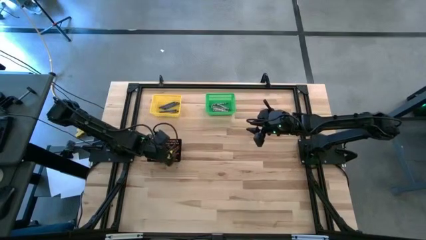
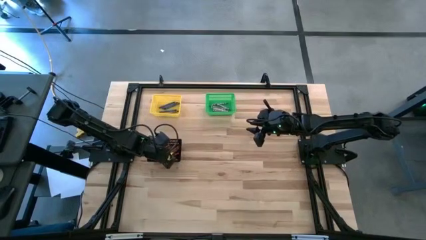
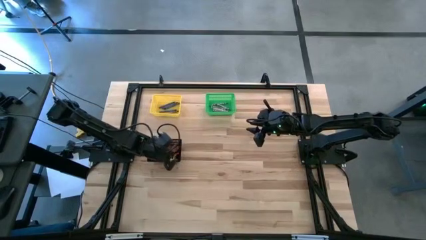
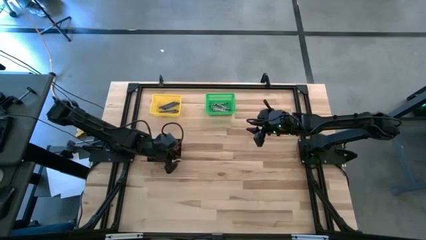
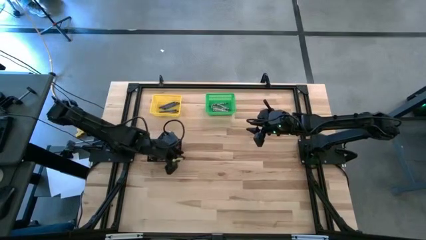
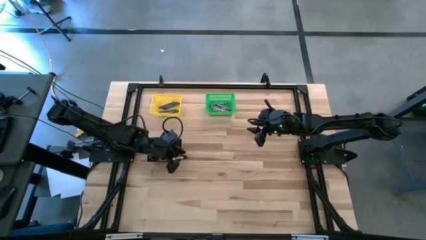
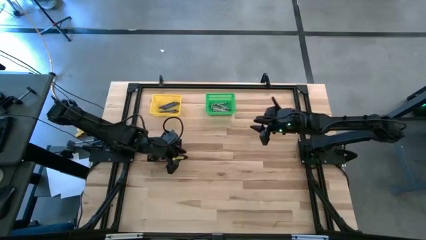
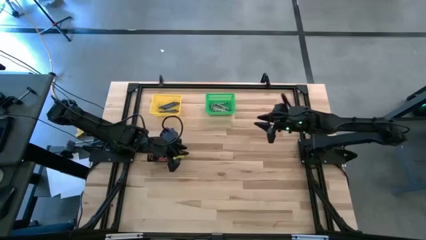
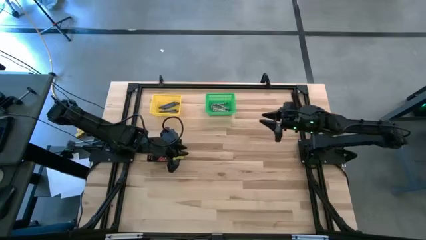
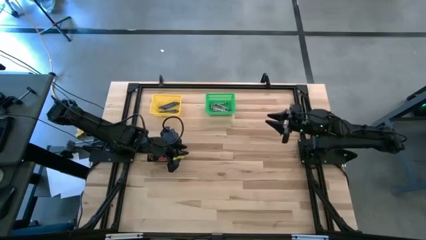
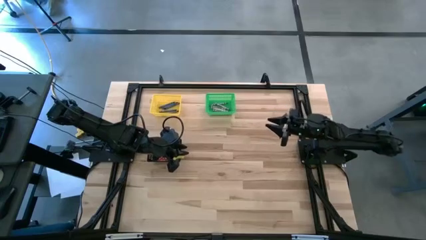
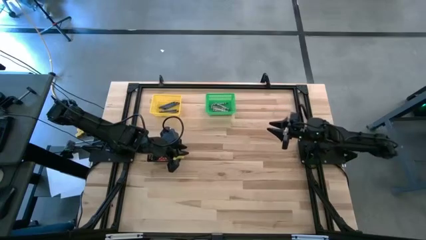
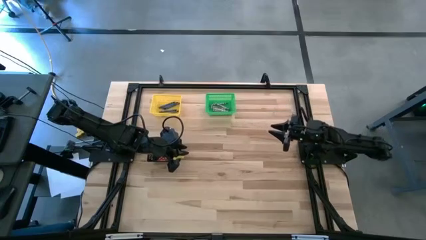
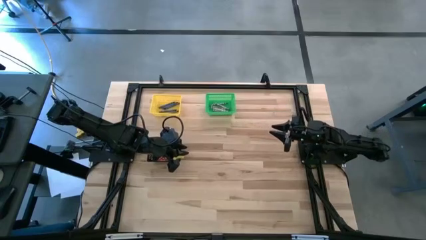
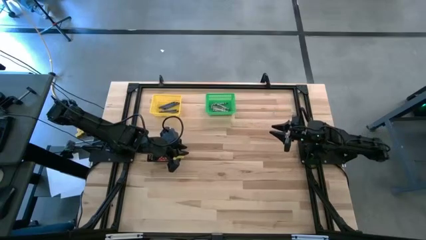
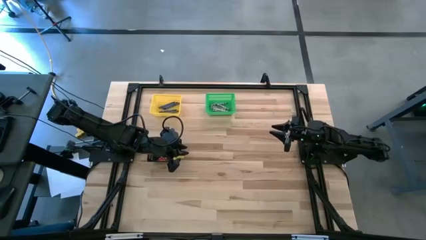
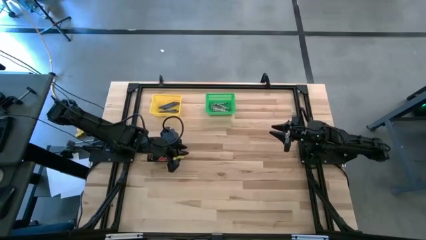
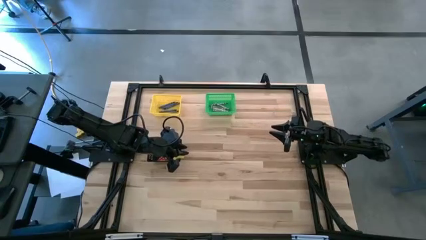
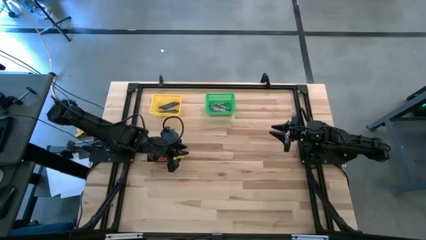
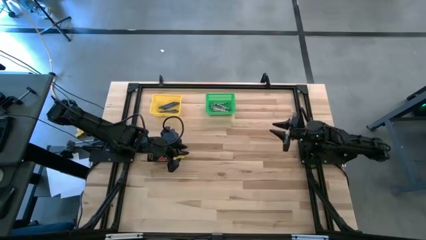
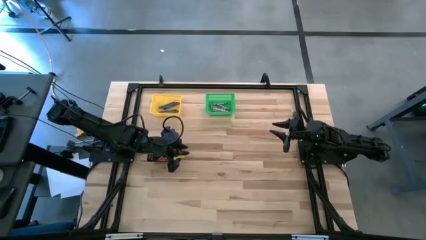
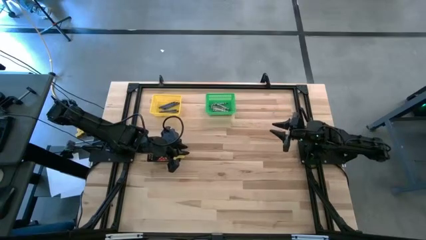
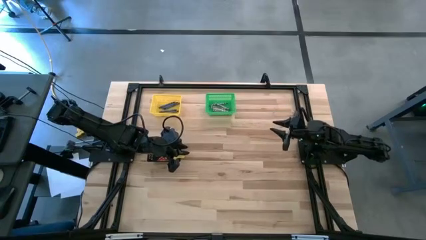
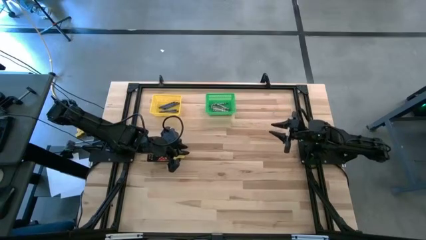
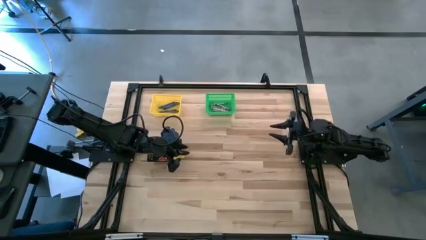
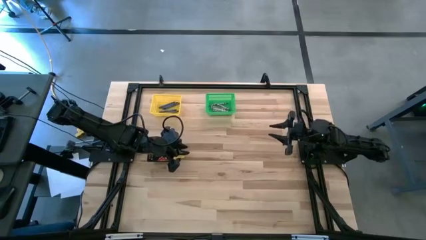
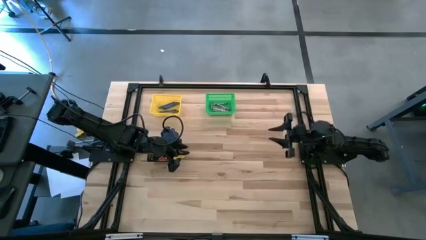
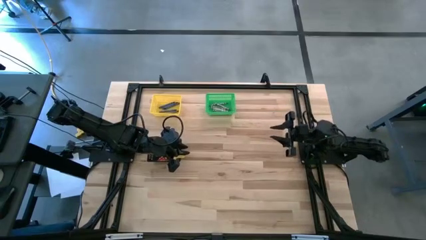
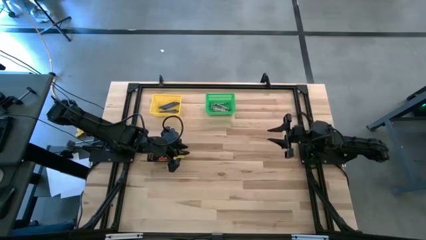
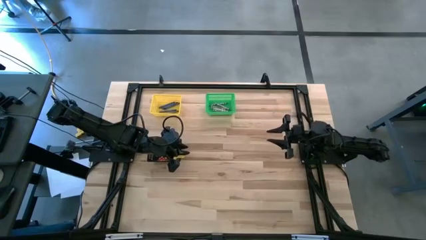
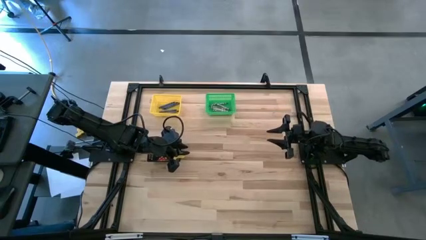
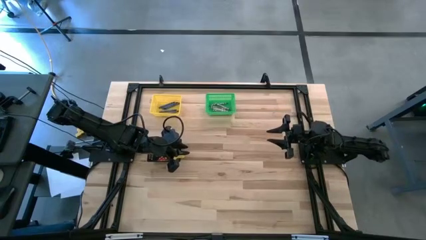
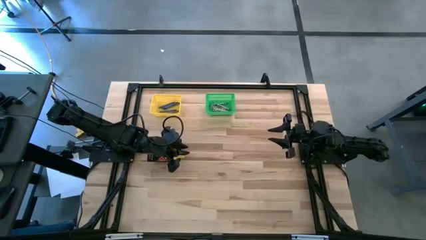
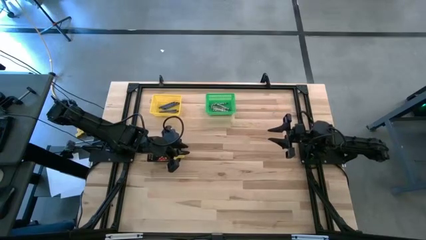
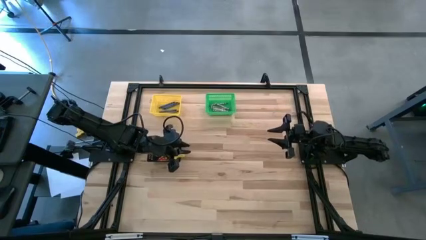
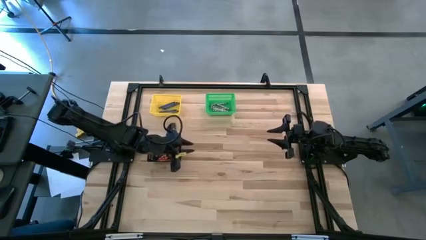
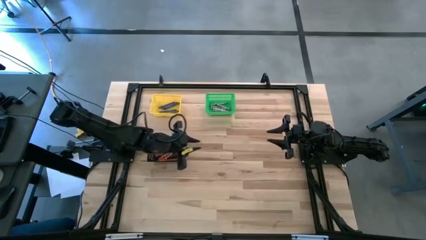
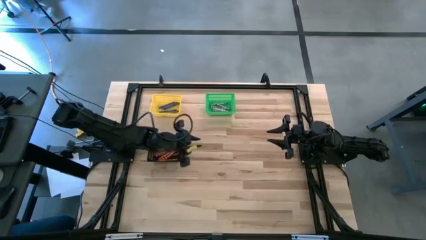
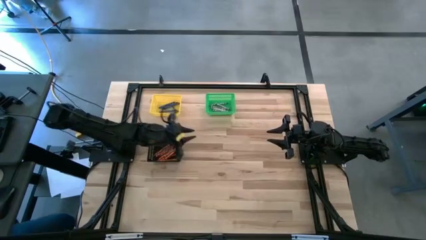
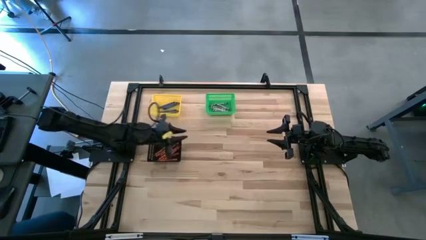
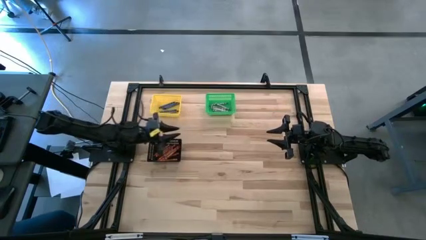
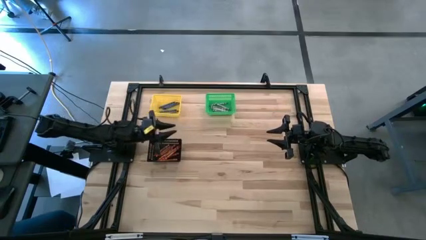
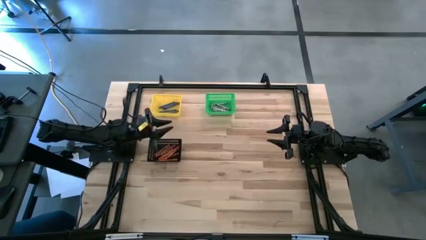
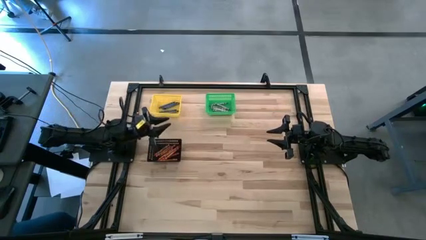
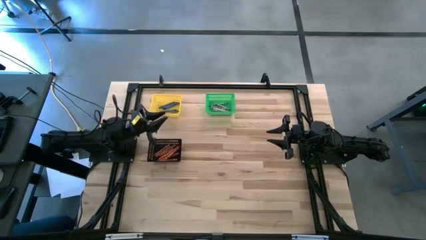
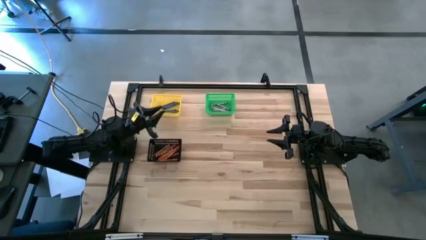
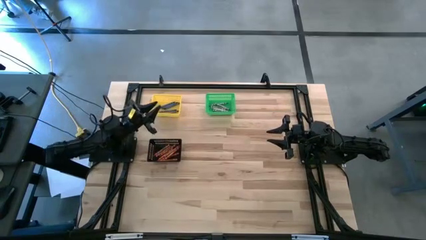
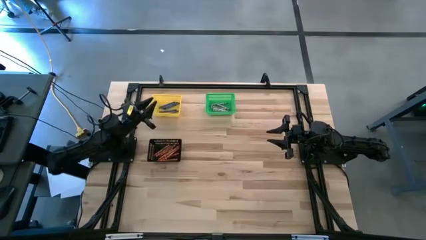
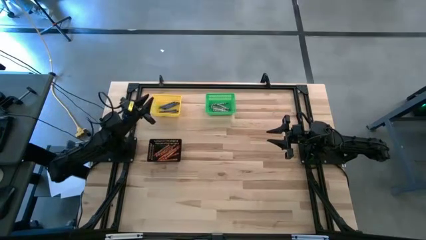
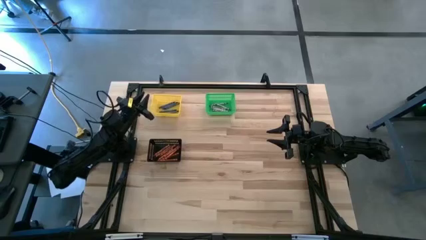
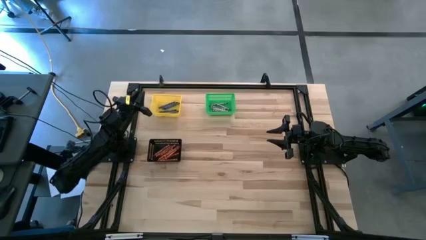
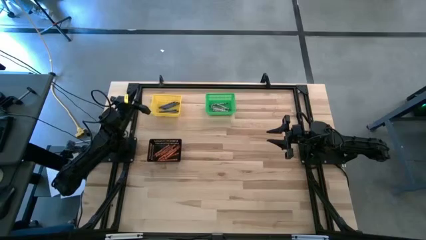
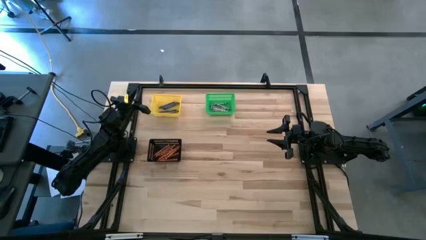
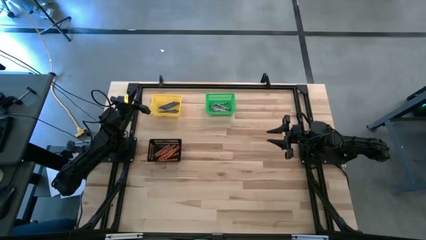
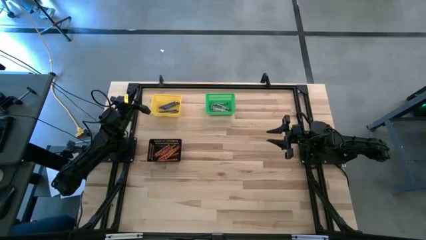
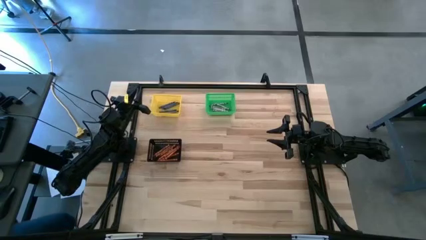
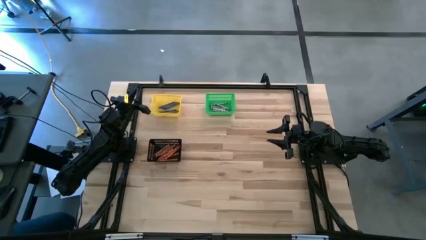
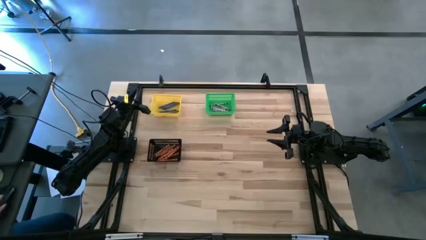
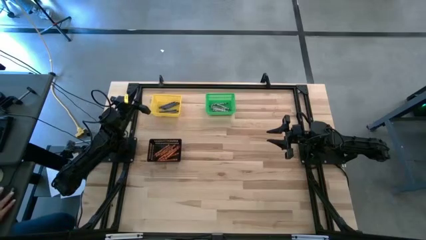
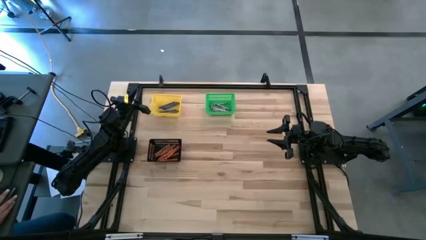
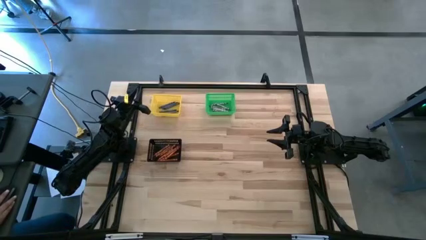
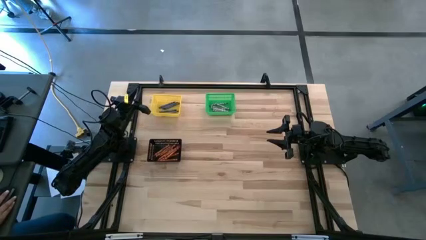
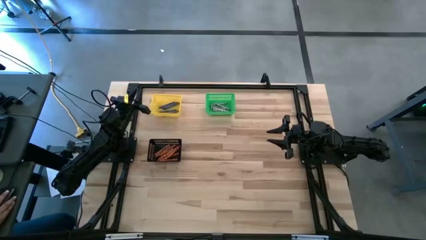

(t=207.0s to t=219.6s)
Task: Sort crayons
Return to Home Position

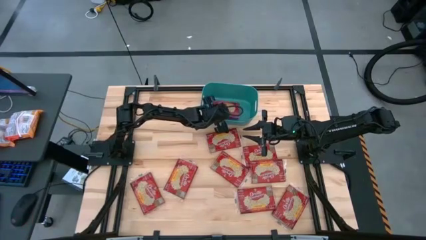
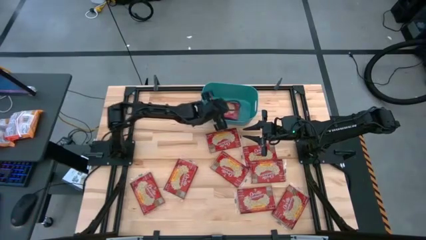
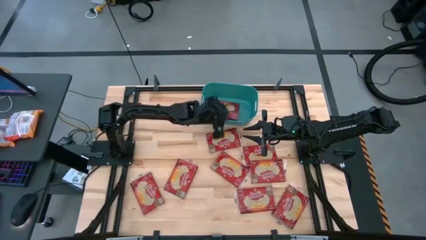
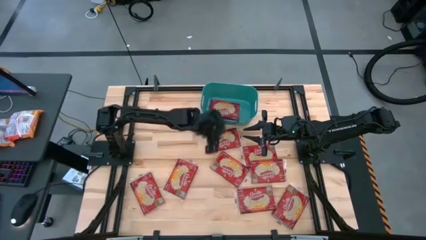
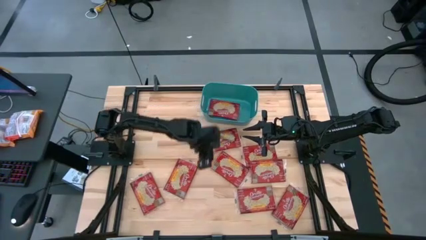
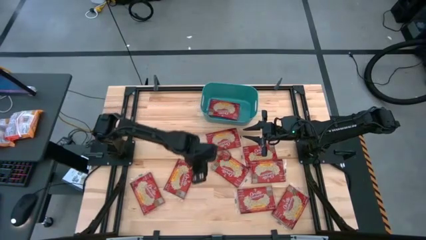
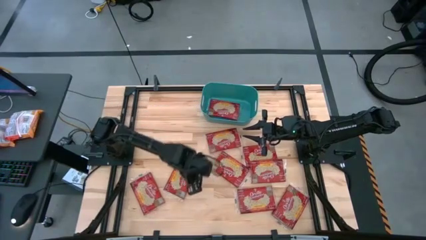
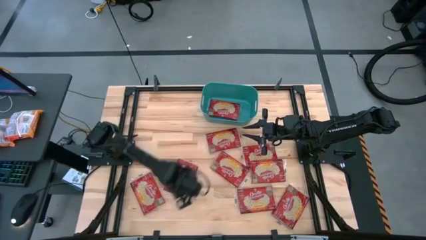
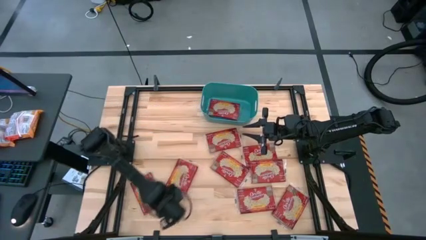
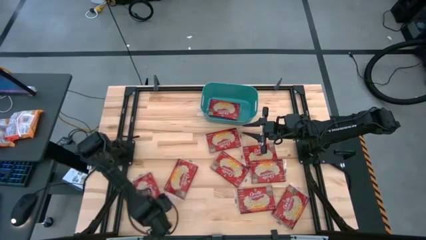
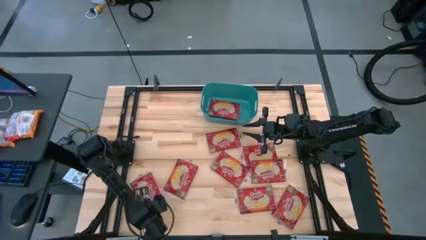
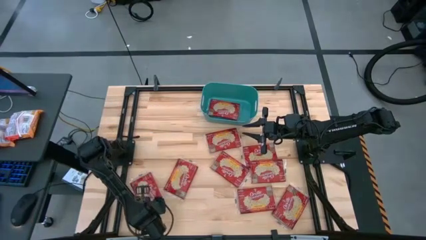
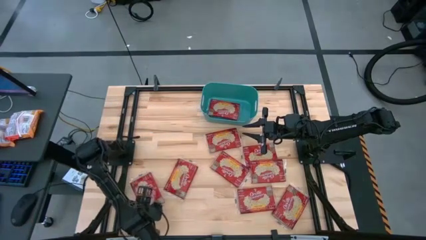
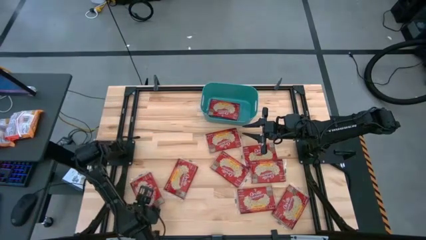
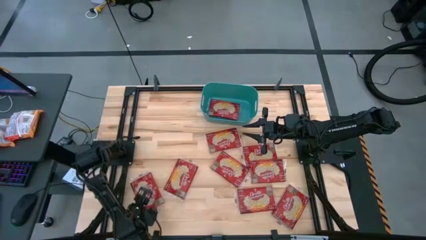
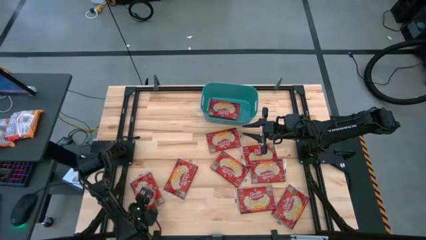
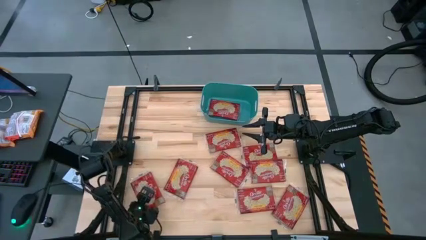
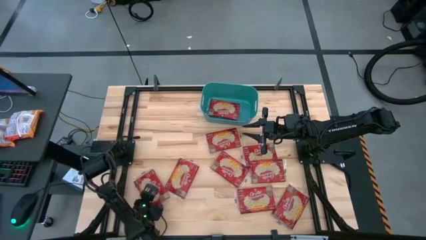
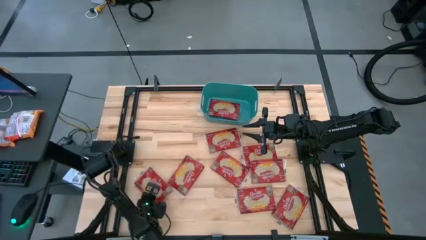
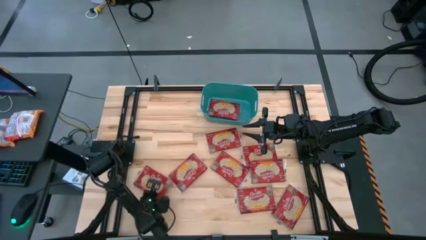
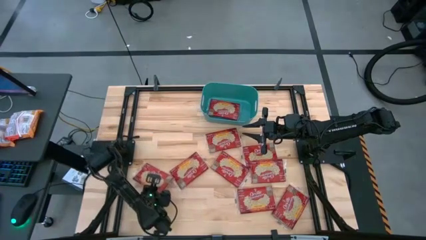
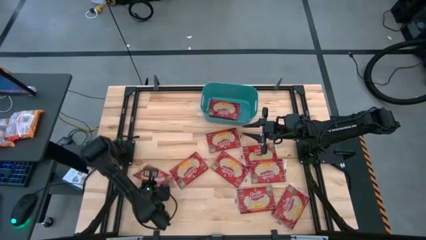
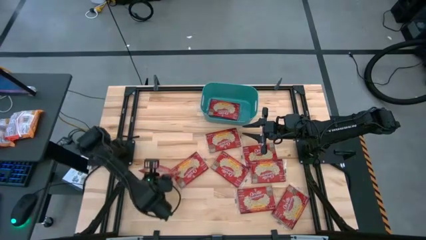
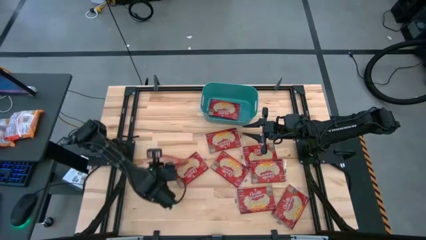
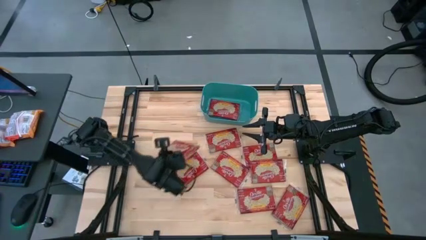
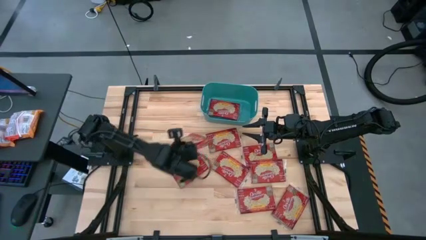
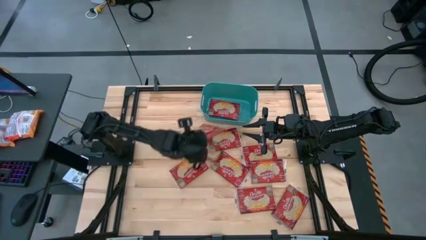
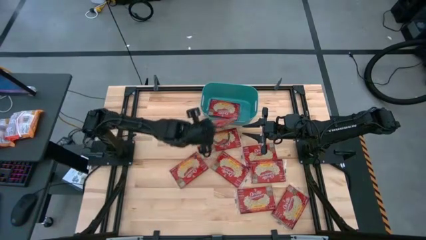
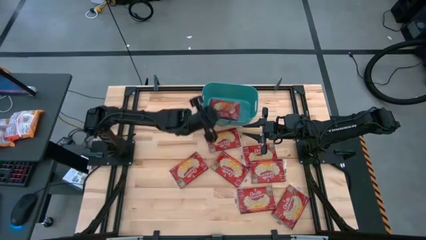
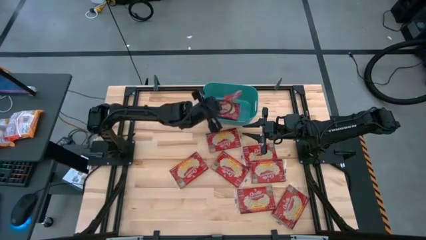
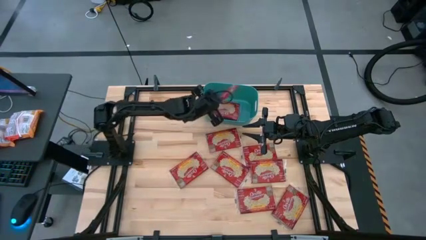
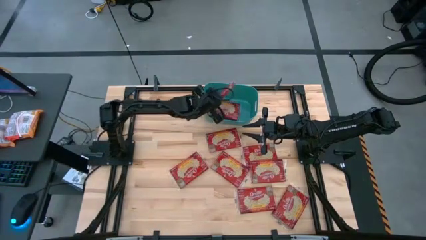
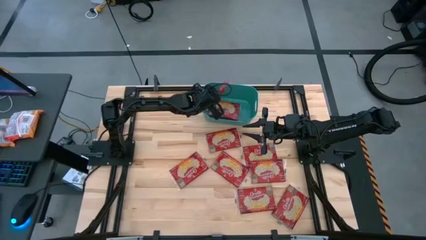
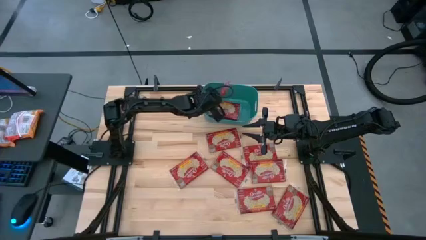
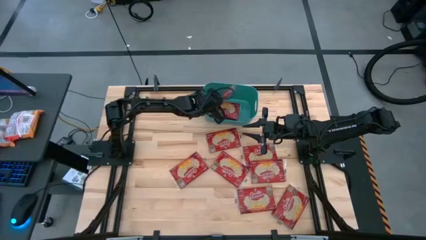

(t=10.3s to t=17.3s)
Task: Sort popcorn bags into baskets
Put the red popcorn bag into the blue bin
